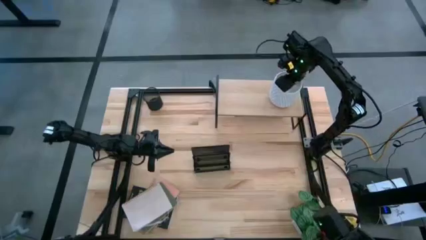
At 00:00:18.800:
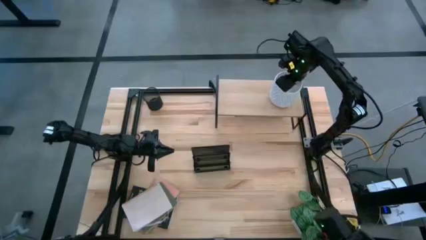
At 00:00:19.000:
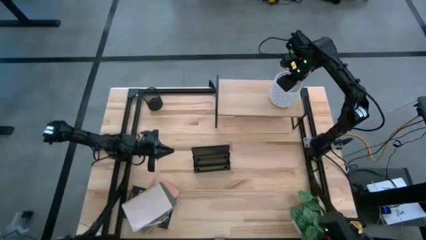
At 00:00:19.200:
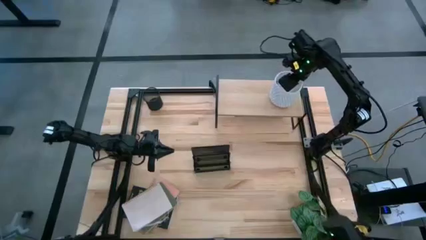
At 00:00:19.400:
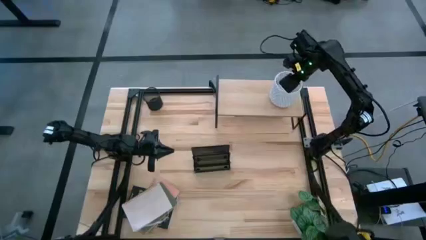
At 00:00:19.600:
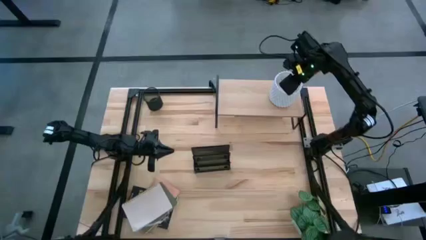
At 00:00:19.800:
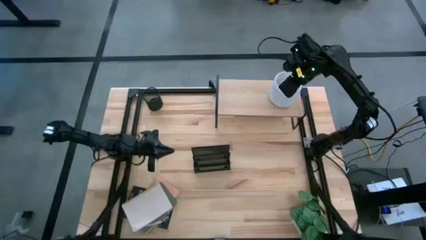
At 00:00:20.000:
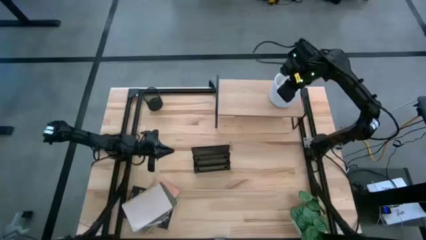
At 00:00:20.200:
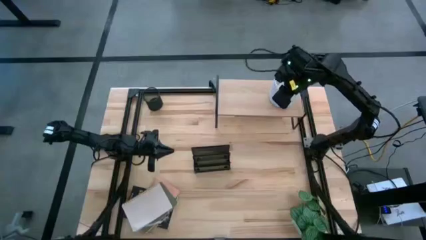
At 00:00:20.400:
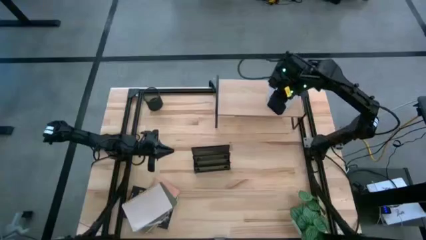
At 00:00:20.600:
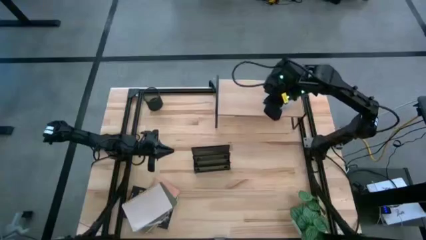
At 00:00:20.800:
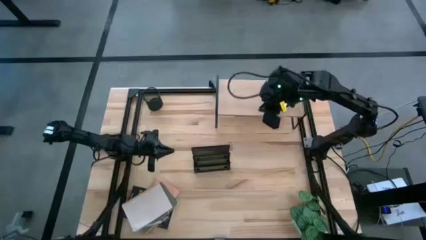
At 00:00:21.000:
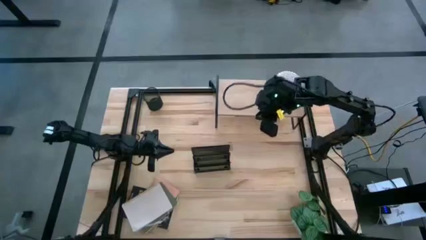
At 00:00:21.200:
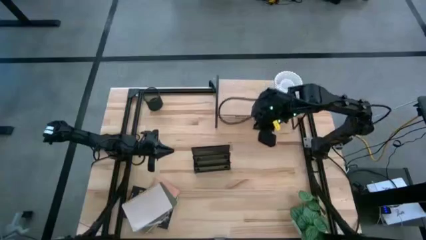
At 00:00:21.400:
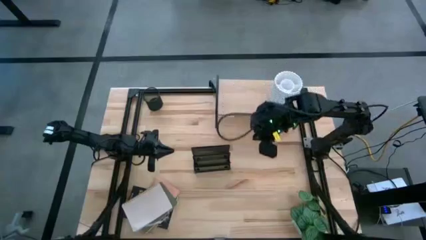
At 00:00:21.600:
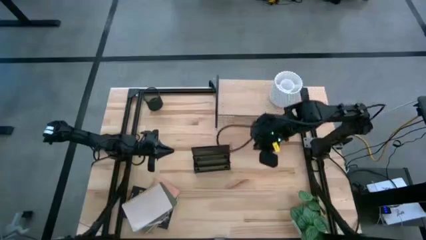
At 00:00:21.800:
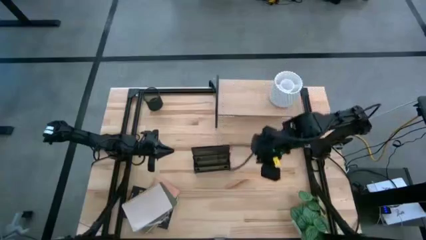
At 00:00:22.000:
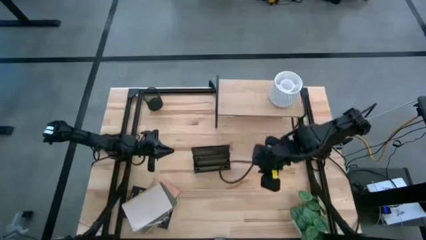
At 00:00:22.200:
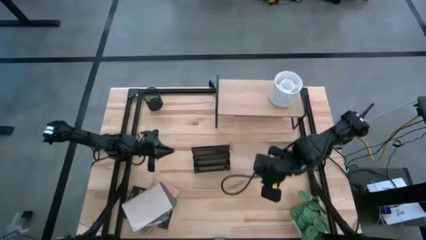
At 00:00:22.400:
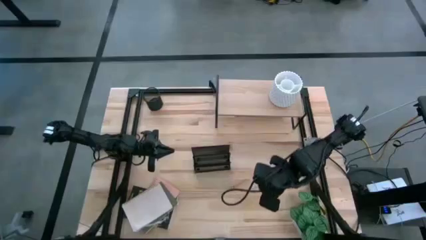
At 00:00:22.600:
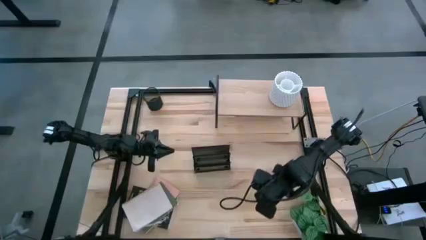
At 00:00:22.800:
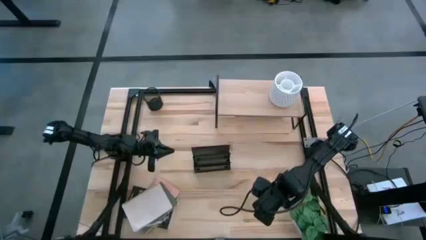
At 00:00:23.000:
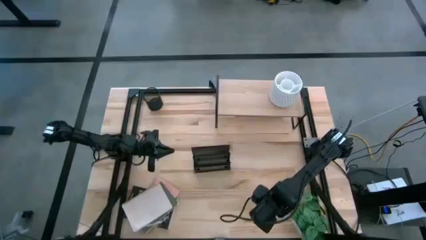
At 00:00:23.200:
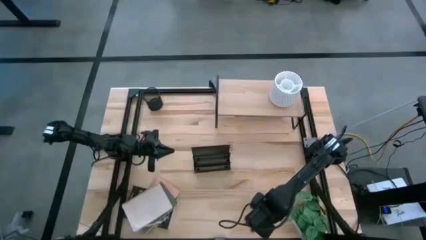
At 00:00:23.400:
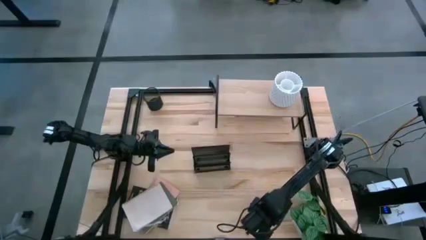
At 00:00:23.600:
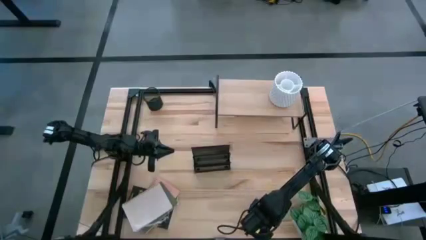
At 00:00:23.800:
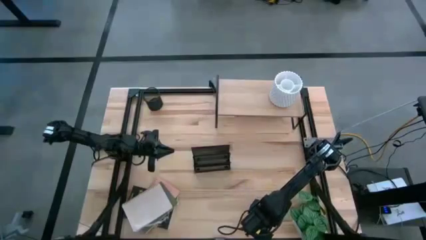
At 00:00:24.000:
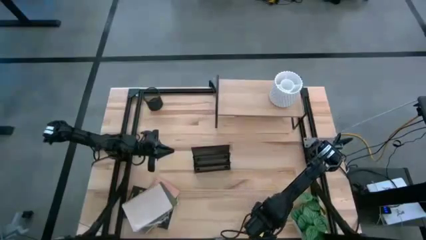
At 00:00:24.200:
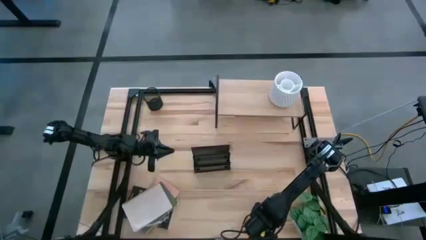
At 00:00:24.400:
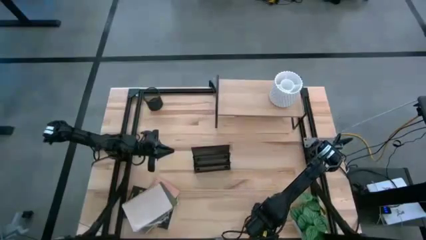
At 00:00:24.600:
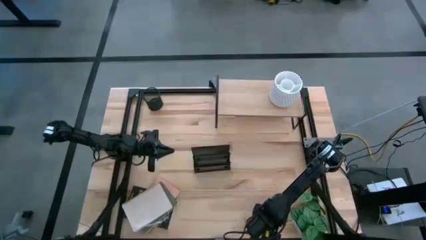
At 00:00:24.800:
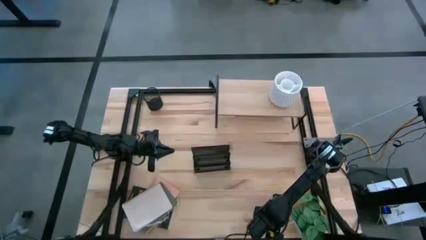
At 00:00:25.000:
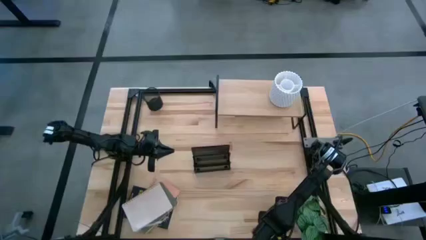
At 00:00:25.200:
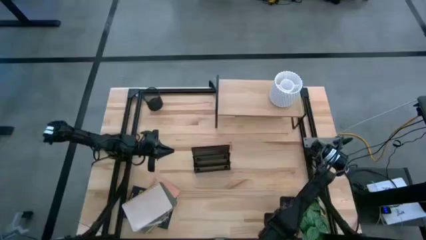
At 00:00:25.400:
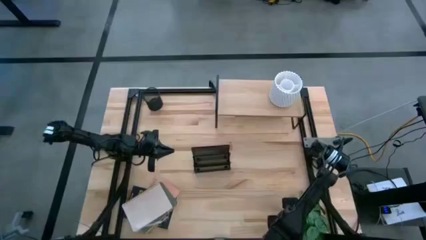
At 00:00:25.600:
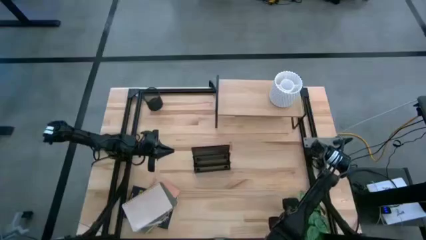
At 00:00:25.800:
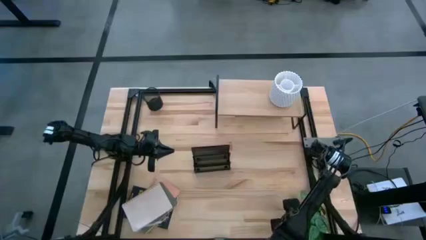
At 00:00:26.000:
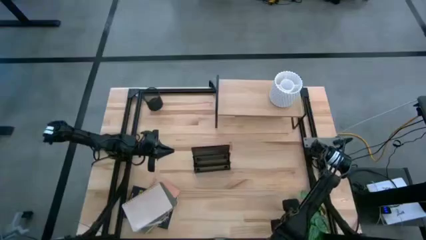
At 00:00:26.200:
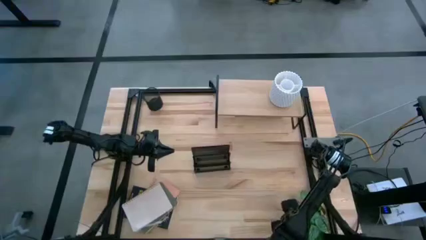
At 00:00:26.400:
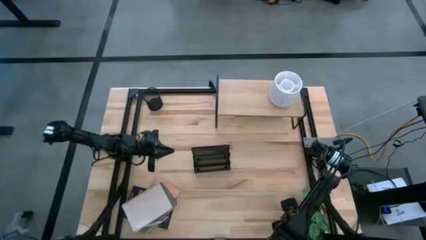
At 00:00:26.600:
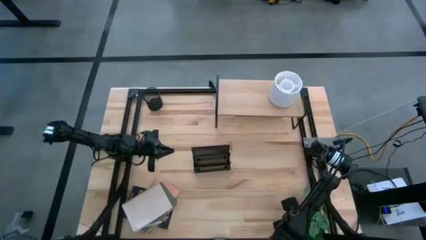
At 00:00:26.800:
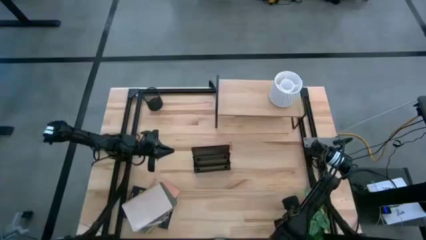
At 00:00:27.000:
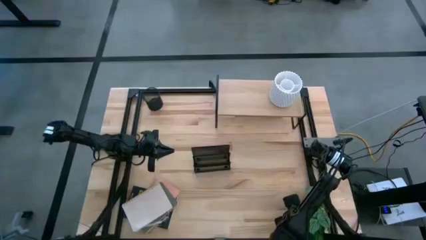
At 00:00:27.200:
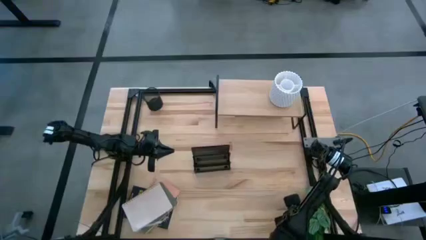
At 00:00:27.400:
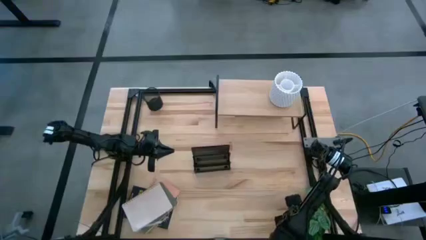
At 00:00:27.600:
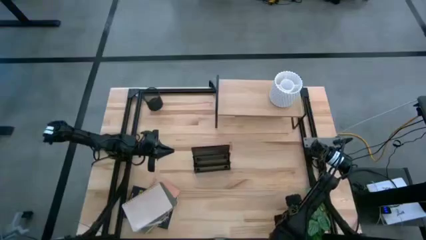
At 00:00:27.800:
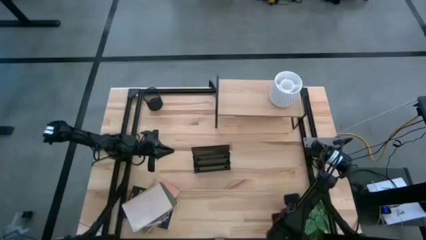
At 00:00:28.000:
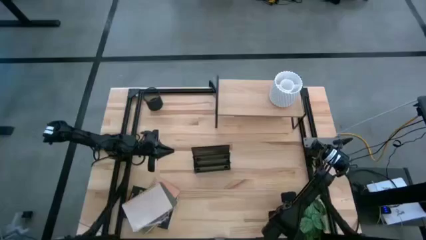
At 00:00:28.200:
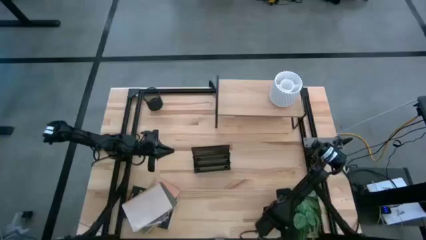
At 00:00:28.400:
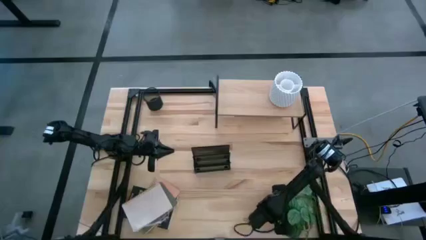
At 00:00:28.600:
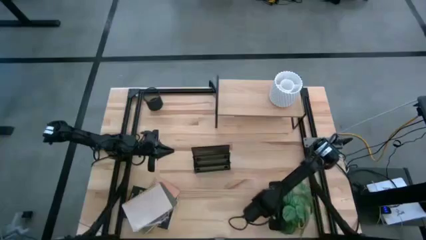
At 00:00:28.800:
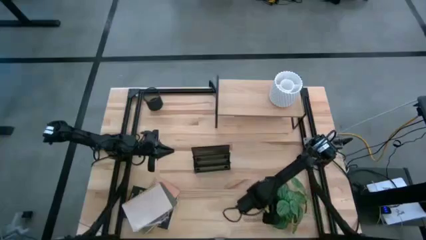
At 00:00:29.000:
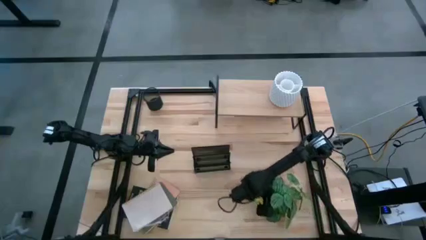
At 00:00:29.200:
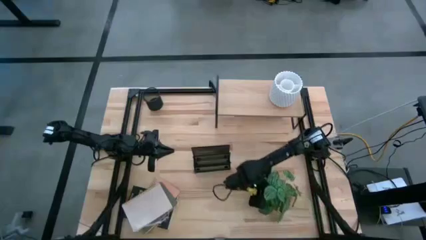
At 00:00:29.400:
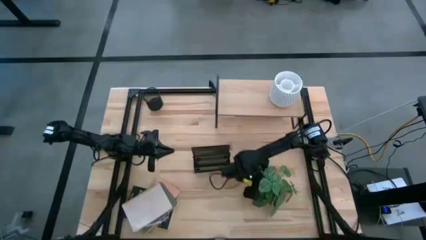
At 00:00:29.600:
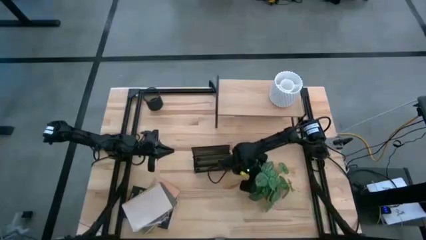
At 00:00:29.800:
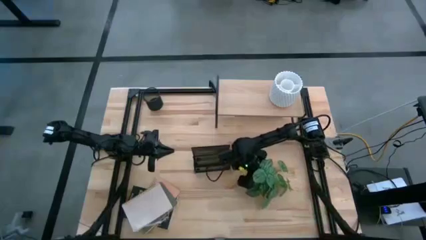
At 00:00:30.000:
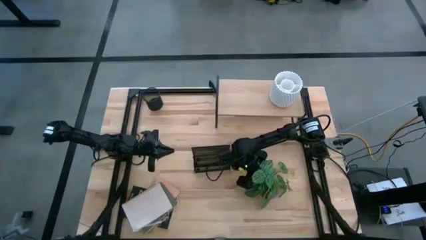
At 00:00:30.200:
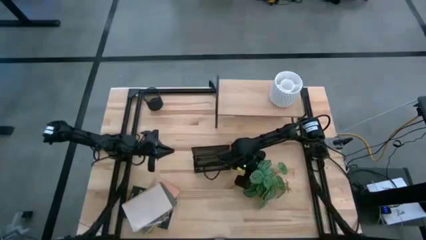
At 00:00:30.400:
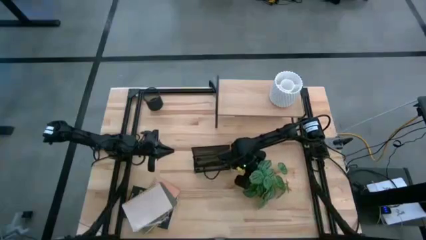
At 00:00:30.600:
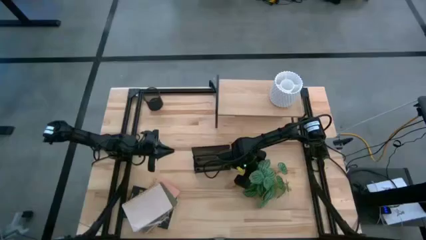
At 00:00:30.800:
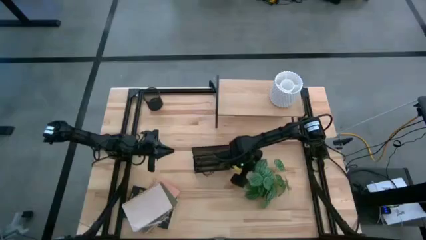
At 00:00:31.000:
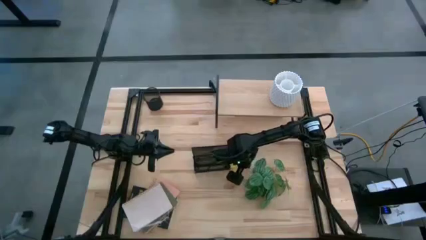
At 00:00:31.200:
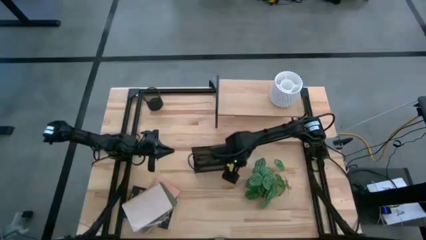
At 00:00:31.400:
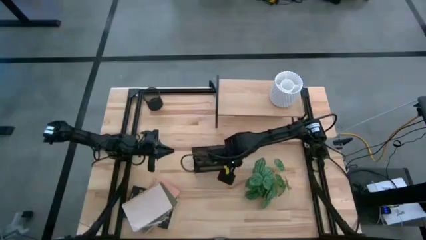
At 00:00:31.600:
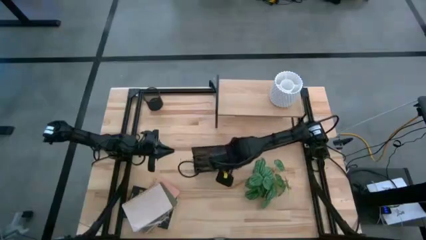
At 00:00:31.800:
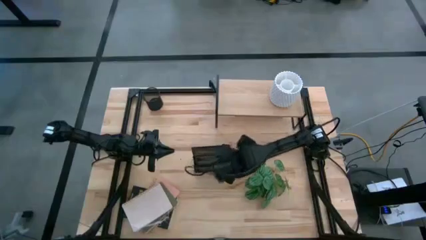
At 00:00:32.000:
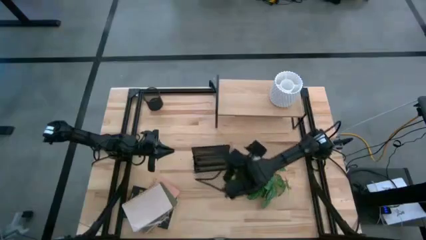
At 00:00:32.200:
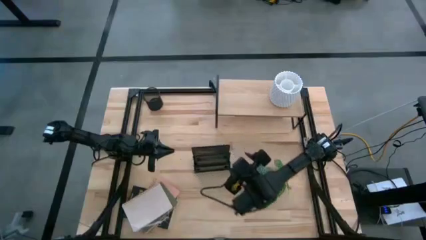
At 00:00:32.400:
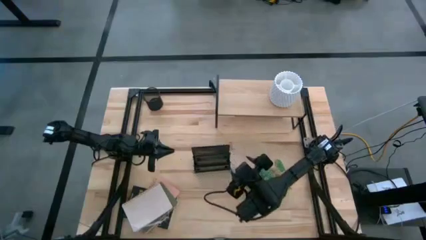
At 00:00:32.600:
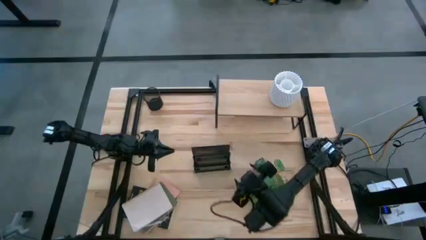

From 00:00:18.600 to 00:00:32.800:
Task: Stock shelves
Put the white potted plant on the shelf
